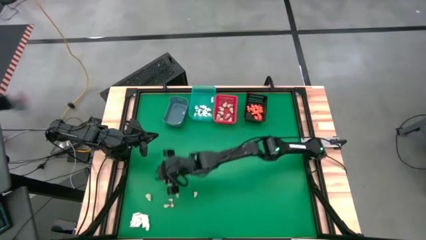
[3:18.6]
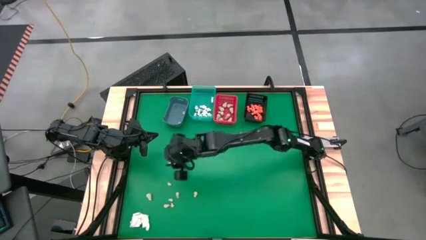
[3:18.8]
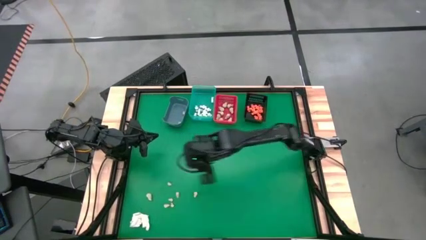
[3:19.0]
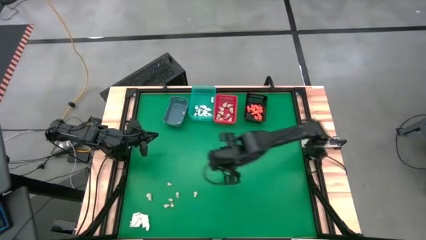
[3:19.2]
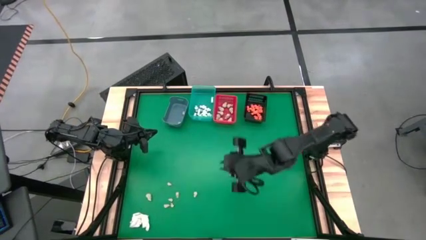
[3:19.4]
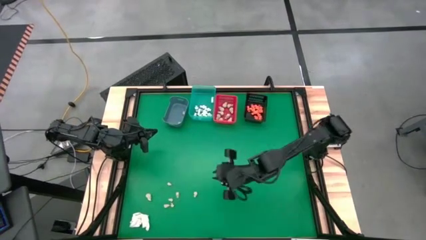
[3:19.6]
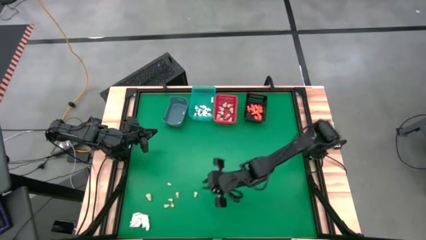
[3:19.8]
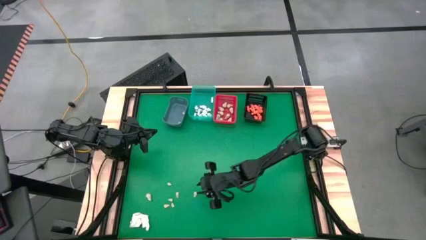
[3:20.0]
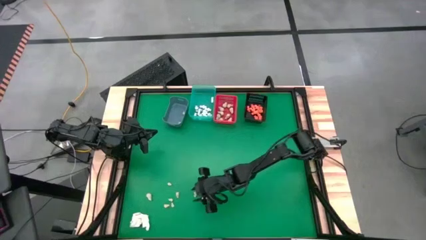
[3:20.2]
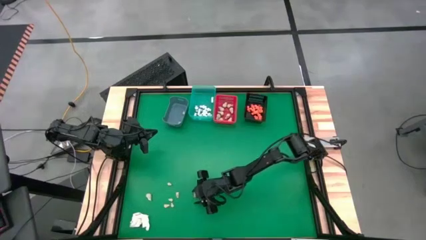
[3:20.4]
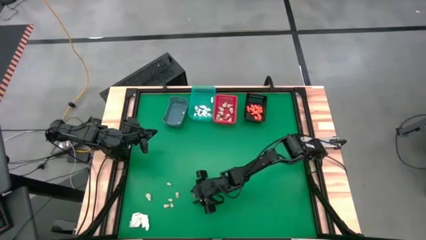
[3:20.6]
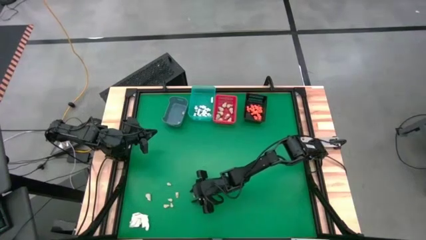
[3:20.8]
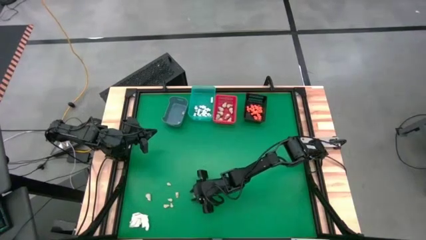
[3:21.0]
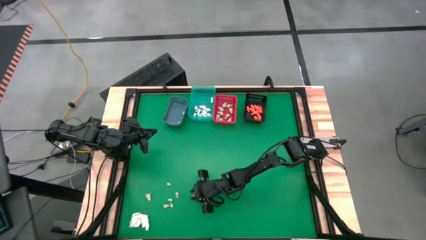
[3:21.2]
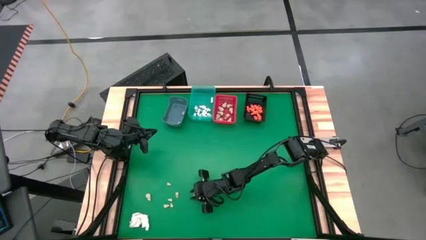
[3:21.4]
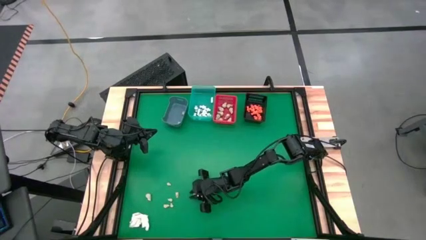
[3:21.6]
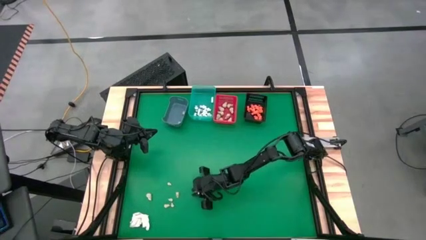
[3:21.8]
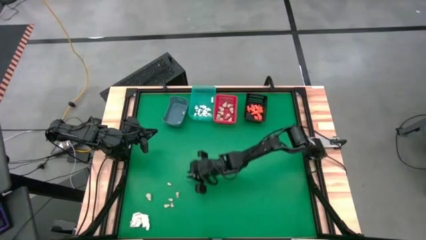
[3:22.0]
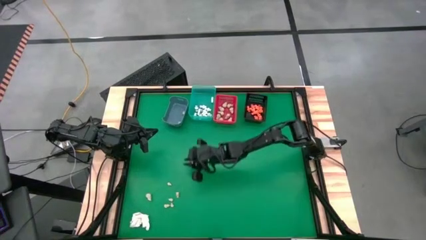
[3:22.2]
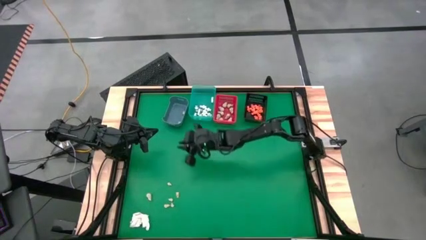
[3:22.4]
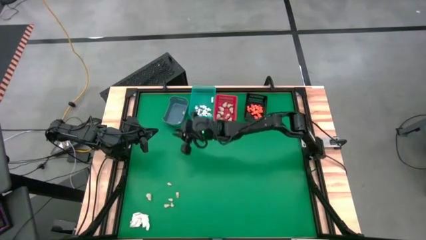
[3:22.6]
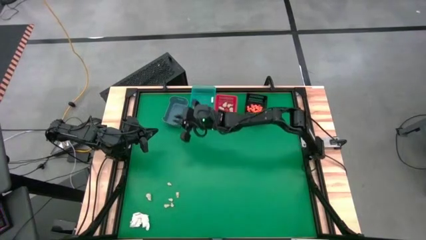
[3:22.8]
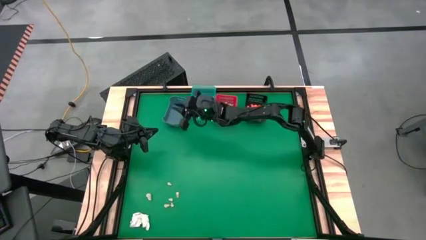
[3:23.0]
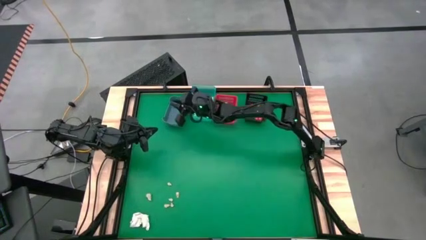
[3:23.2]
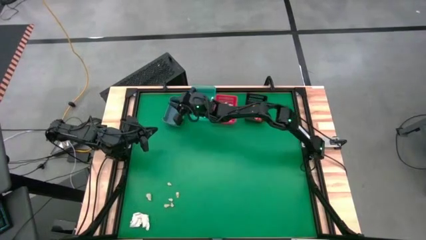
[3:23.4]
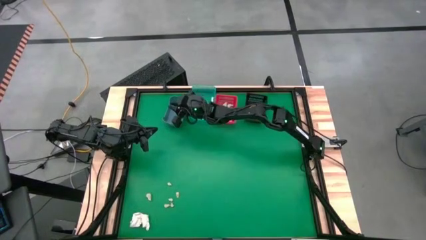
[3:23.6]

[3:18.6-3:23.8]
Task: Sort Halloween decoration
Put the white skull toy into the blue bin

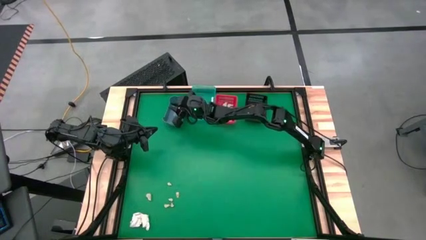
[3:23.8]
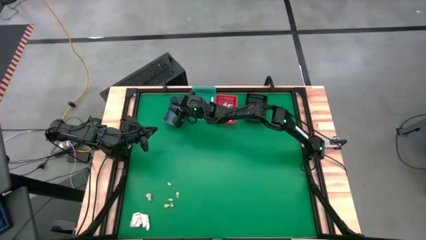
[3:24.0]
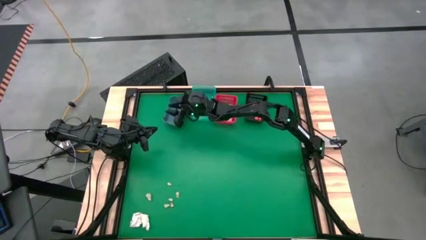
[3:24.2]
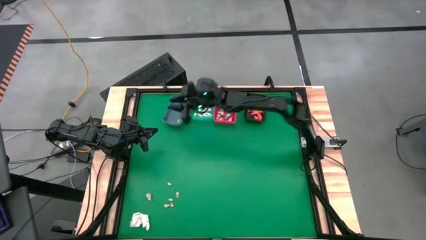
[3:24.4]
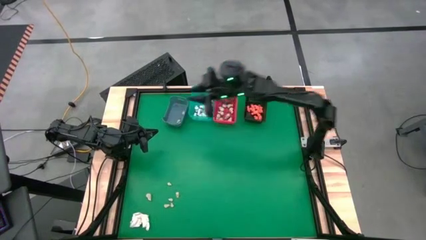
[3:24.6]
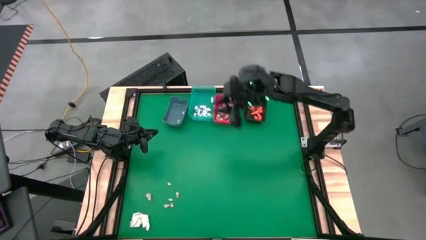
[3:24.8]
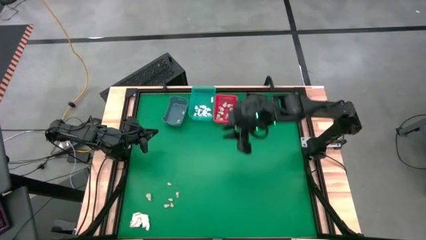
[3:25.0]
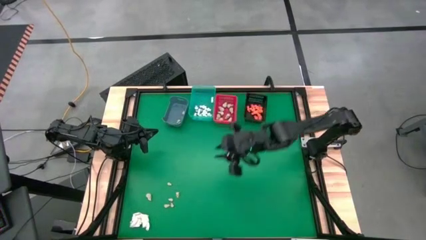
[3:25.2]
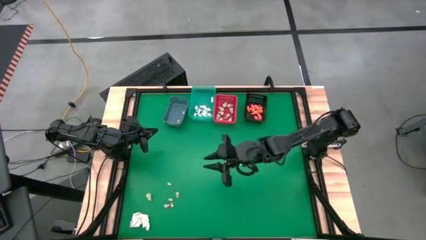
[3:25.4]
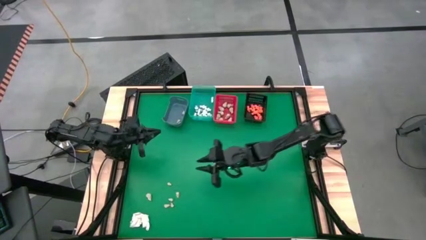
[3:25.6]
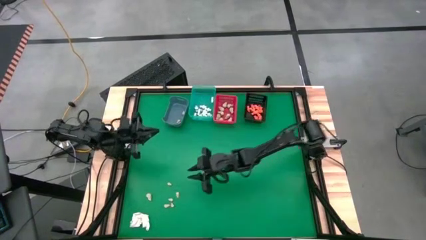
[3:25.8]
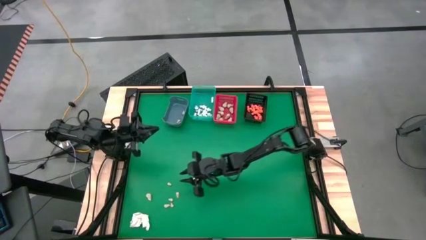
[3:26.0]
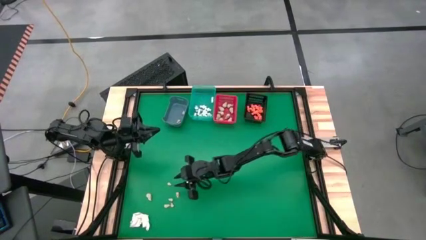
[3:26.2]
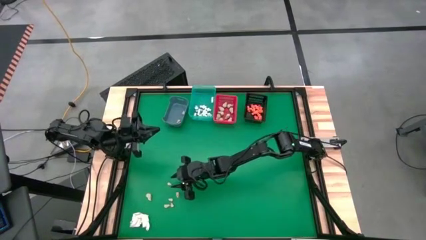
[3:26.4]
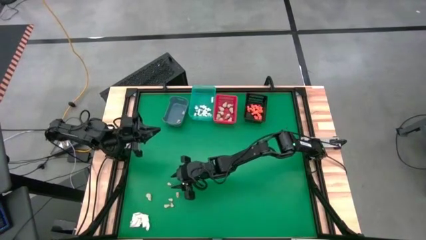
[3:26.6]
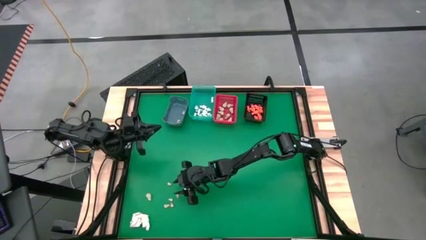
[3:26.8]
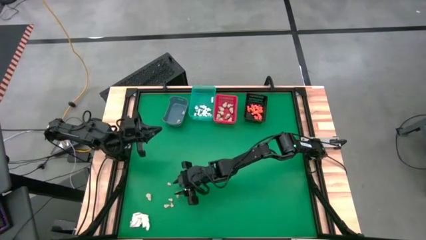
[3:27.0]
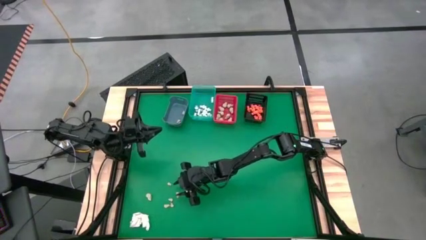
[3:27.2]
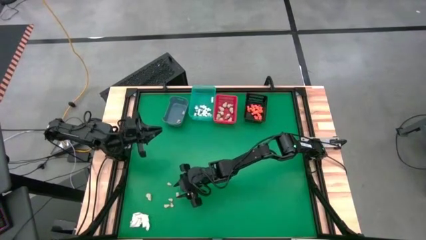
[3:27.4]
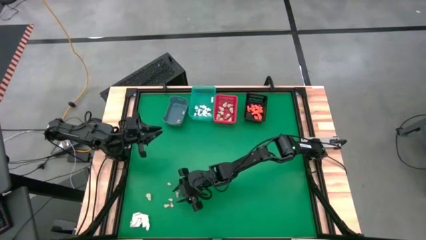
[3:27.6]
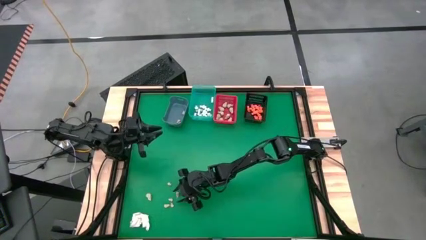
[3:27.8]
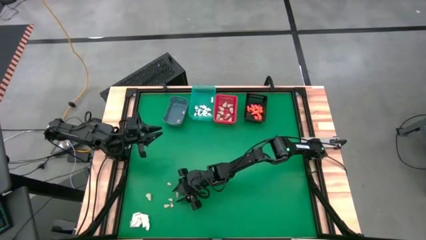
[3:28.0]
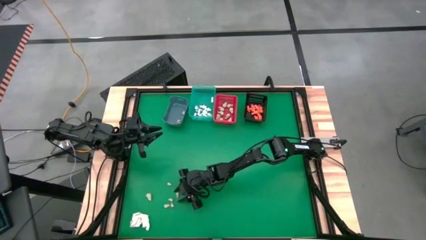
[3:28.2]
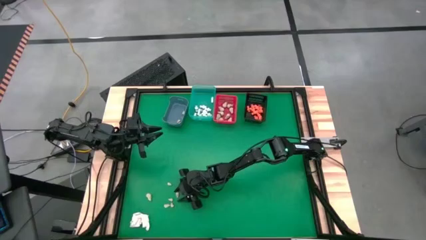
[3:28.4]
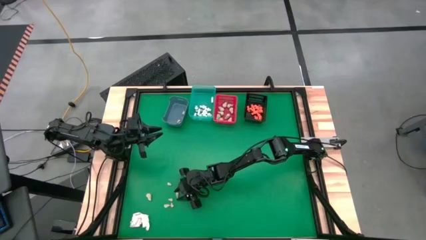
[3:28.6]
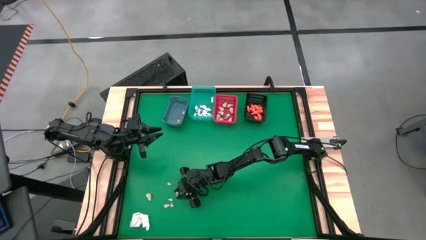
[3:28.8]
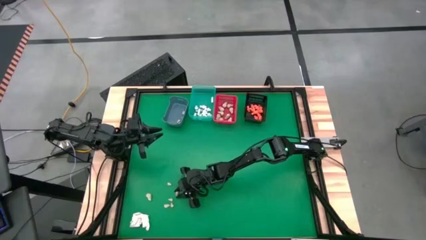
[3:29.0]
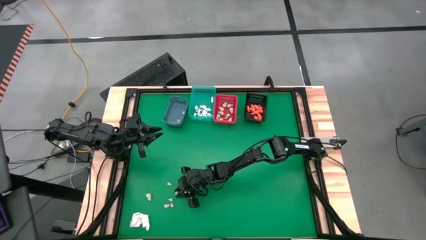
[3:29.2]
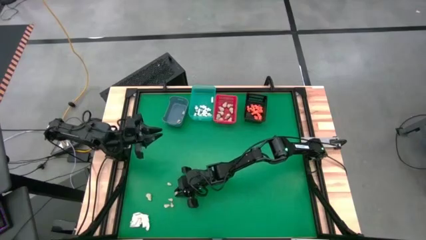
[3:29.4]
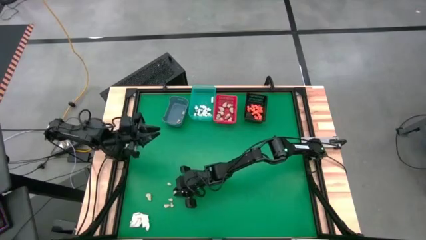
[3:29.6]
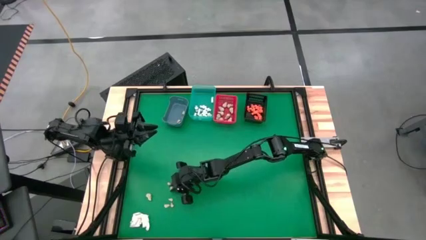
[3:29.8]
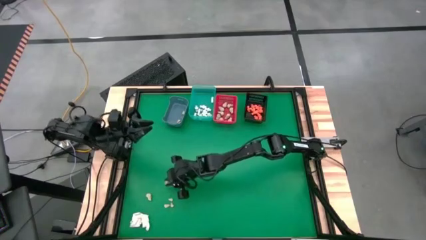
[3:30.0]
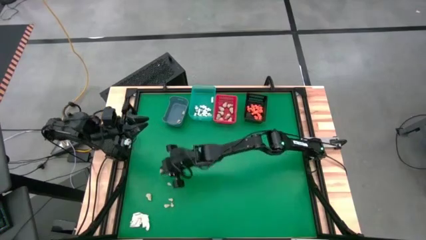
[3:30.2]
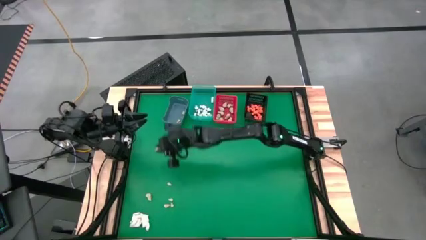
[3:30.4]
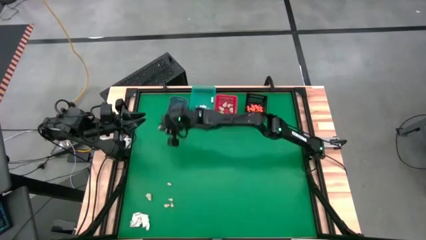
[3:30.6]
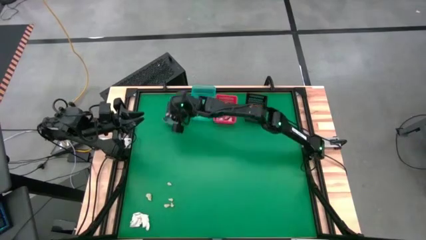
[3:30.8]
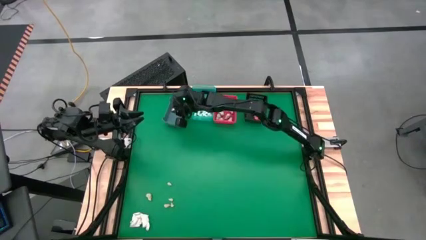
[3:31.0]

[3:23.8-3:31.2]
Put the white skull toy into the blue bin

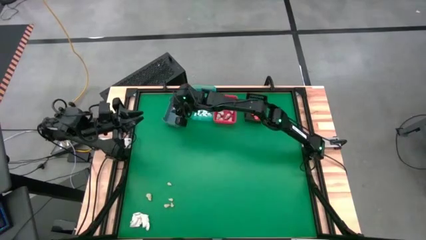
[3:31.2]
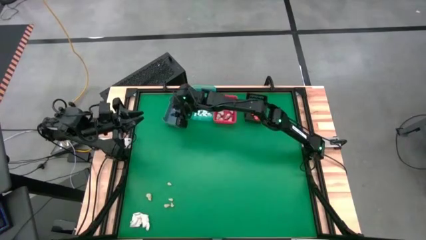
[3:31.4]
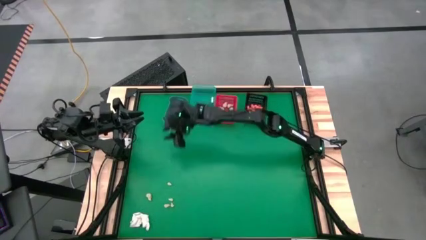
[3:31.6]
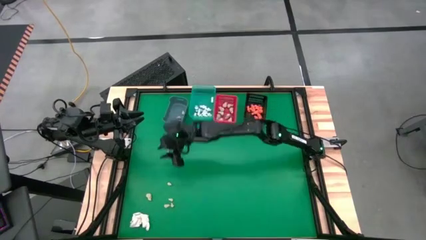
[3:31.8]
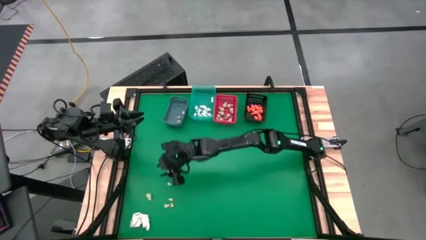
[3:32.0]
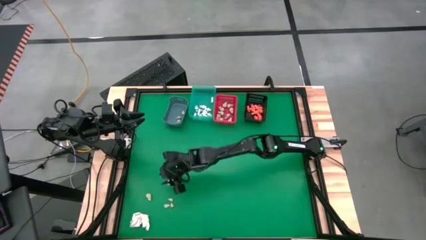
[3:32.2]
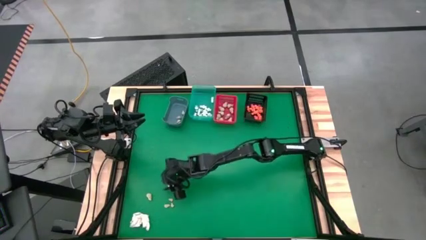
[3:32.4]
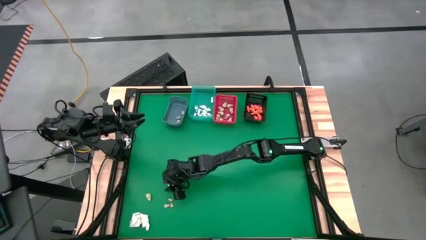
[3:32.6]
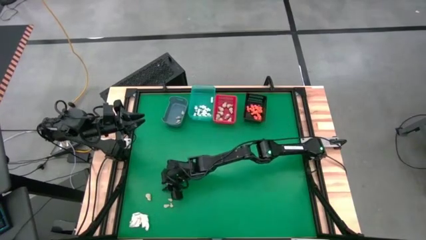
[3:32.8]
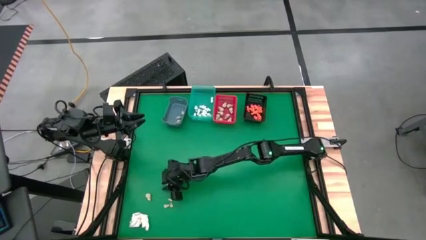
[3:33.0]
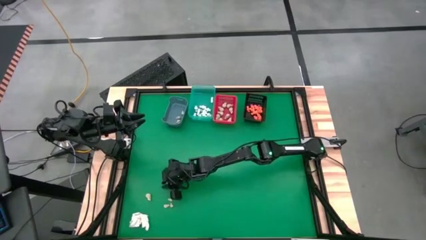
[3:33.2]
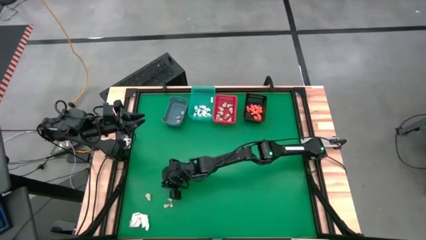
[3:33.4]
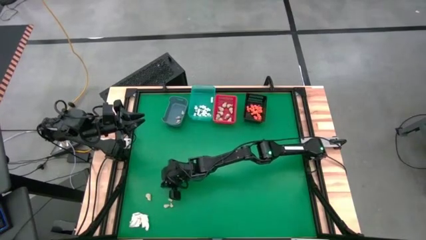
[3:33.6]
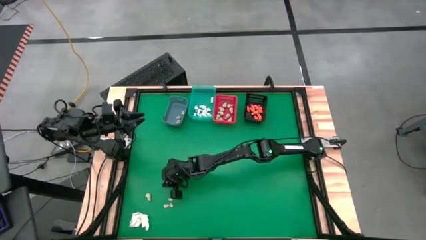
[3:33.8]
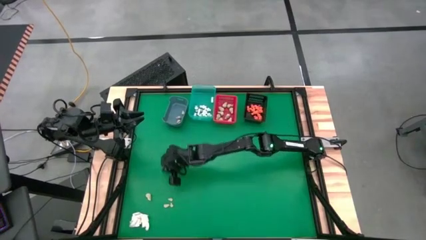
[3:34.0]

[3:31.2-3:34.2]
Put the white skull toy into the blue bin
